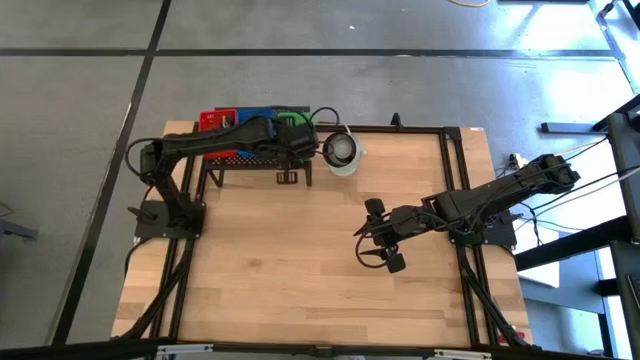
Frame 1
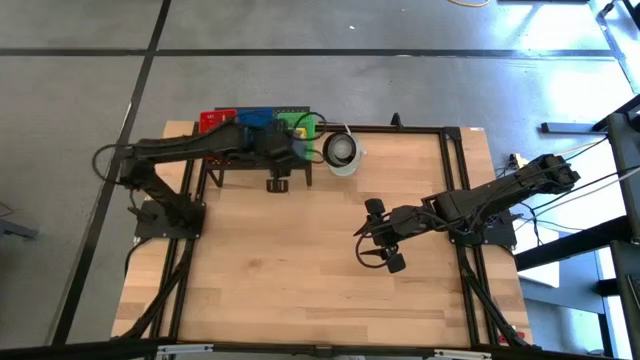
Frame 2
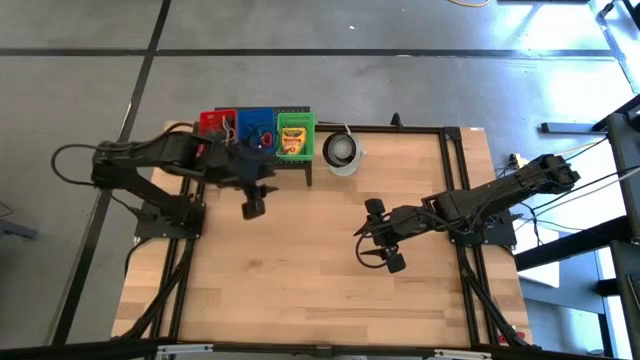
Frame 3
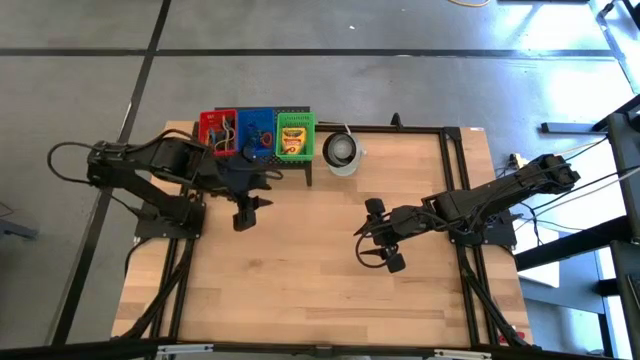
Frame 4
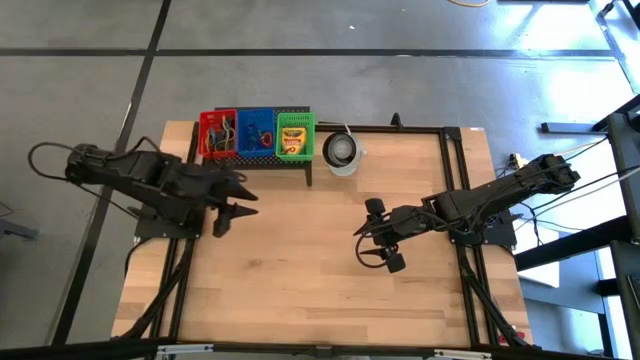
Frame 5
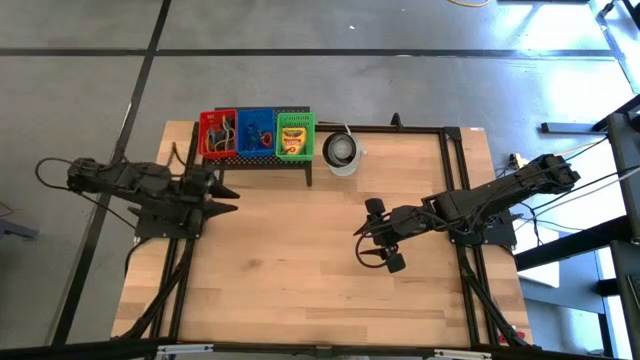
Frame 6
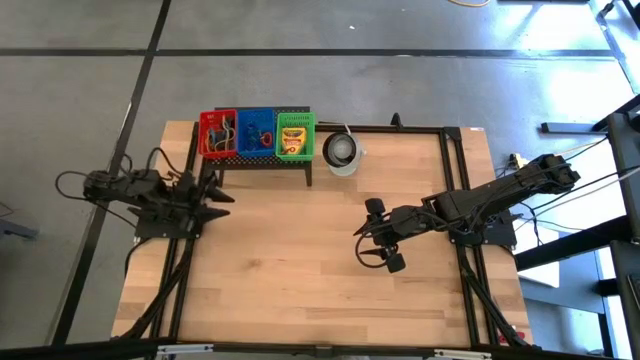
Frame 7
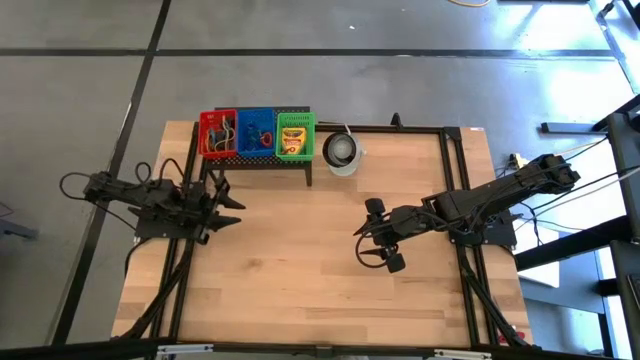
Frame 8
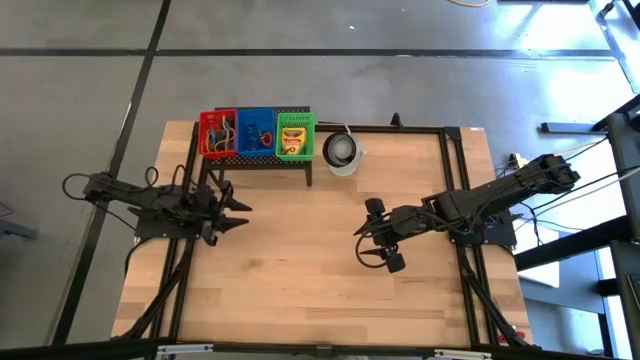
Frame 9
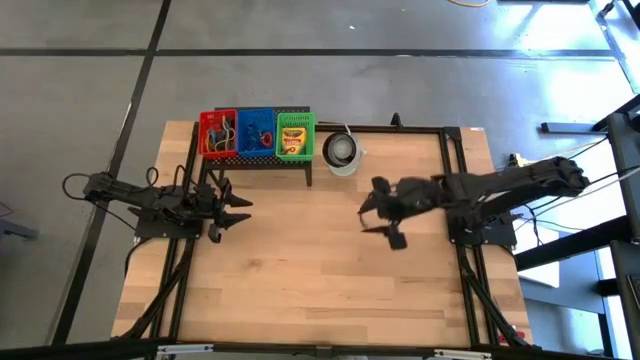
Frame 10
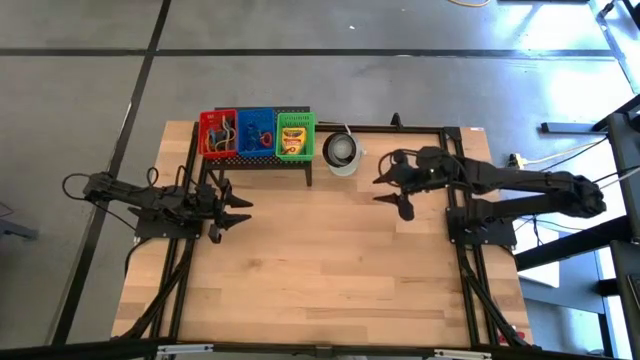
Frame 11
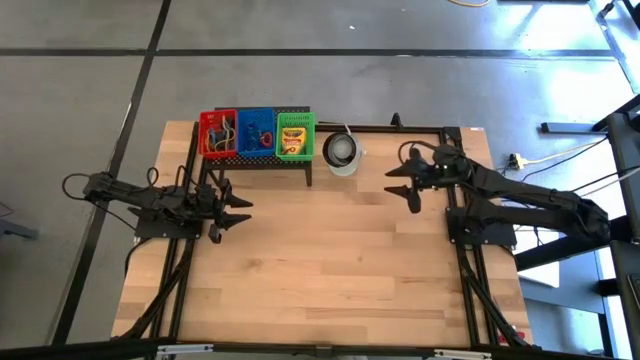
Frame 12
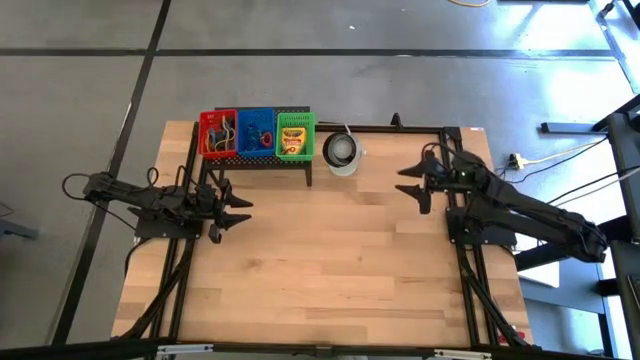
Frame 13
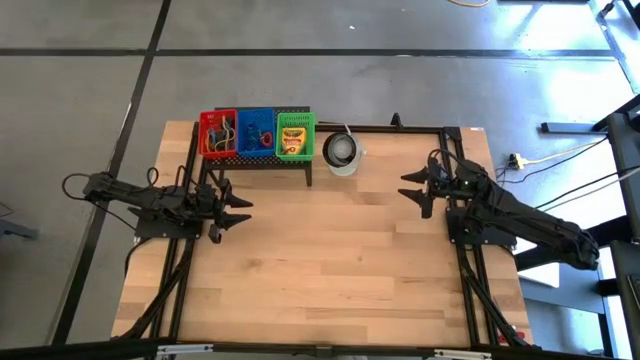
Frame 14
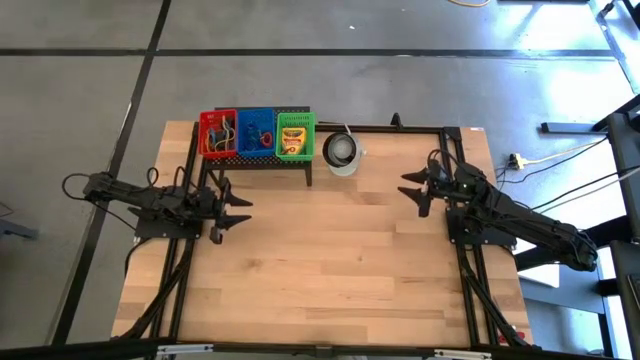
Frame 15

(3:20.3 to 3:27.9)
Task: Pick & Place Office Desk Supplies
Return to Home Position

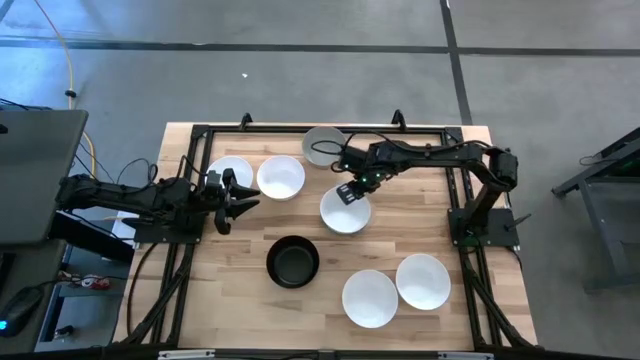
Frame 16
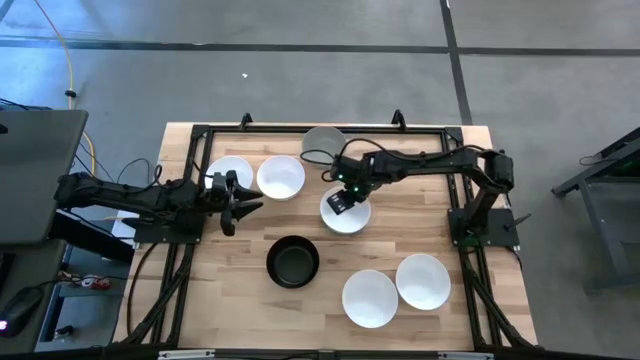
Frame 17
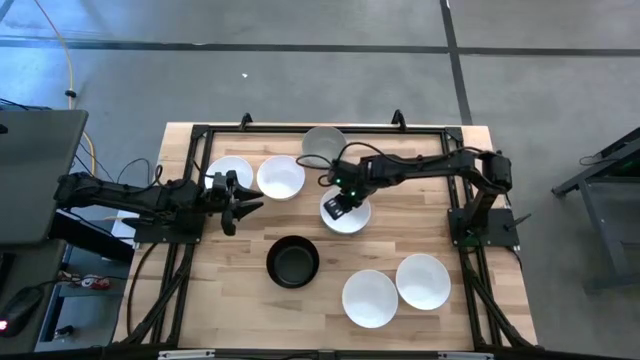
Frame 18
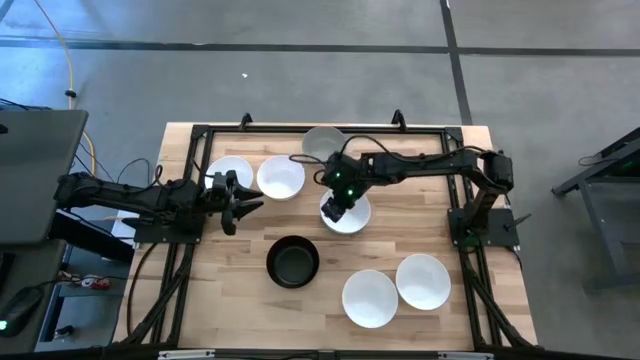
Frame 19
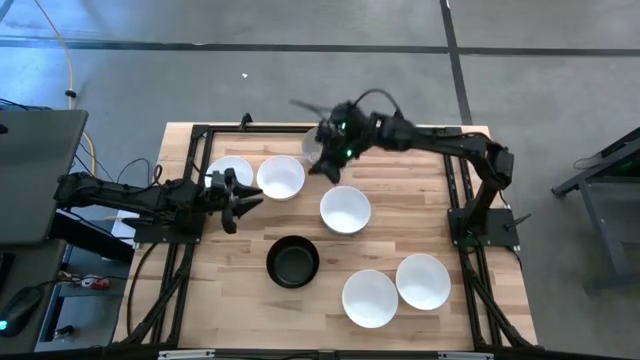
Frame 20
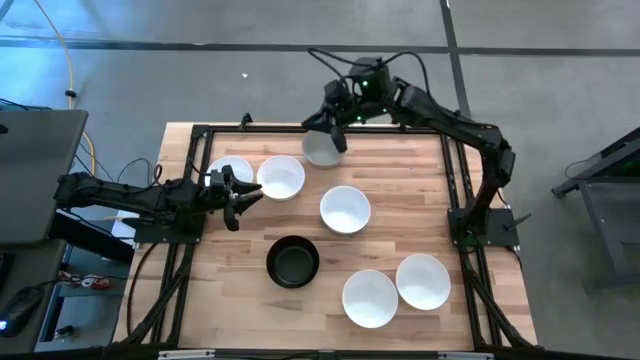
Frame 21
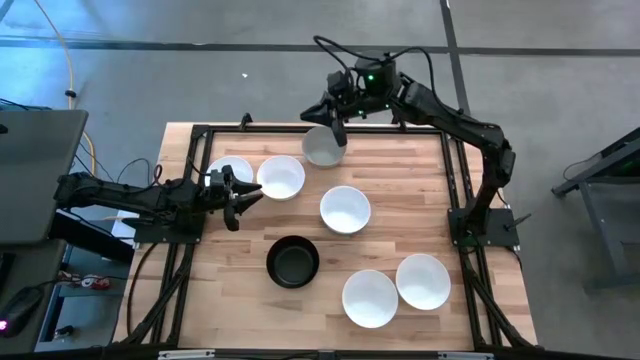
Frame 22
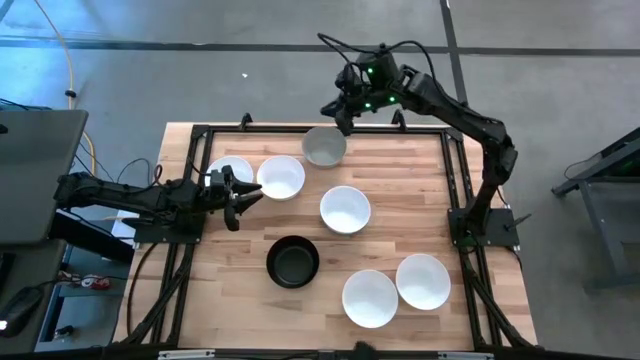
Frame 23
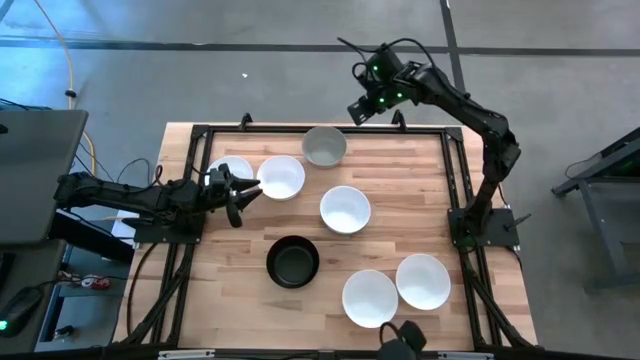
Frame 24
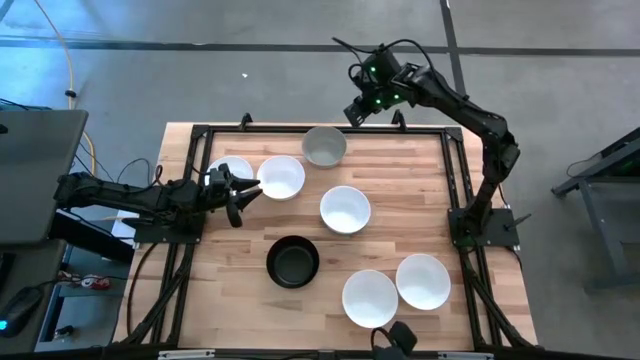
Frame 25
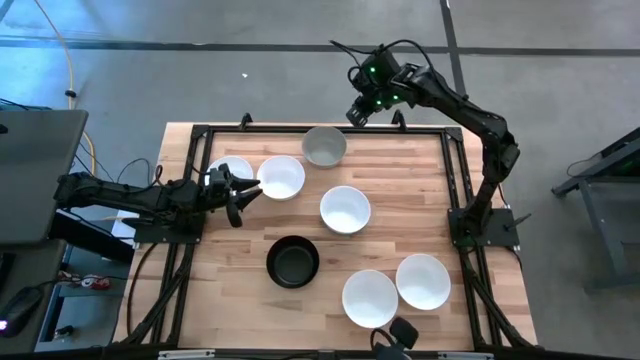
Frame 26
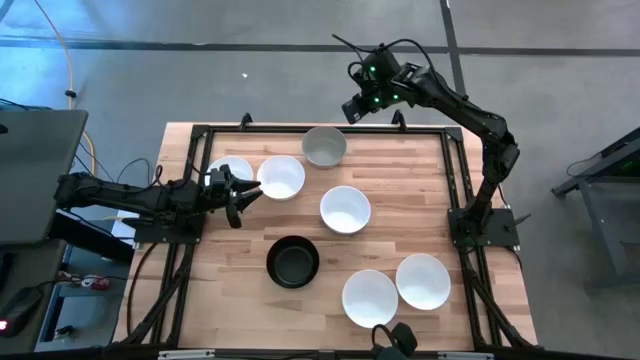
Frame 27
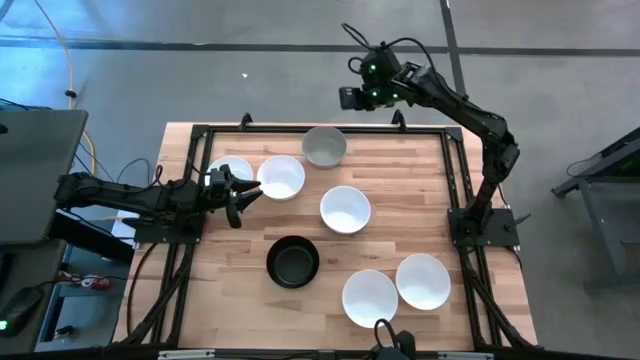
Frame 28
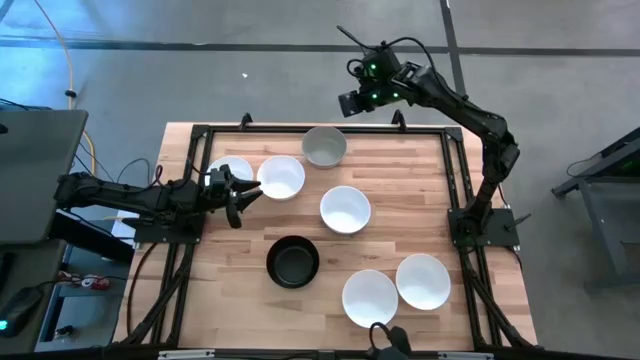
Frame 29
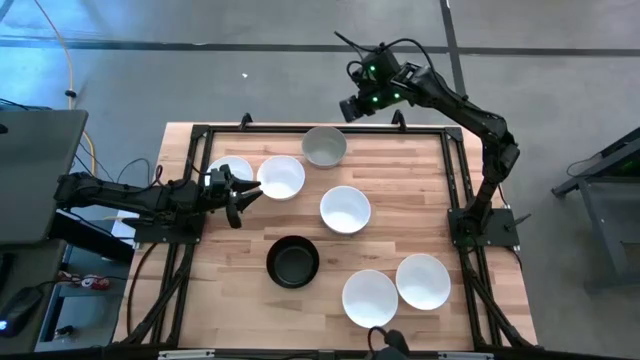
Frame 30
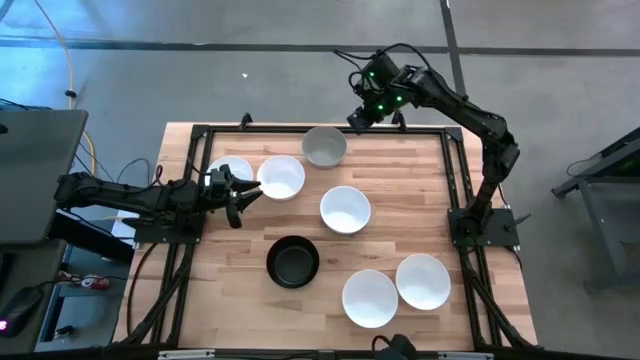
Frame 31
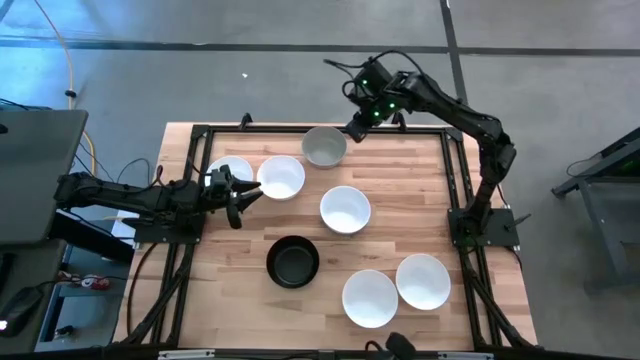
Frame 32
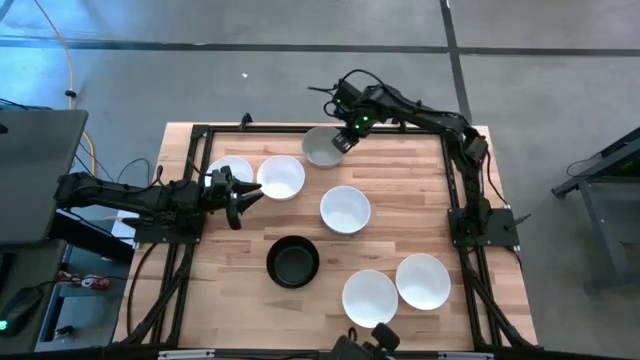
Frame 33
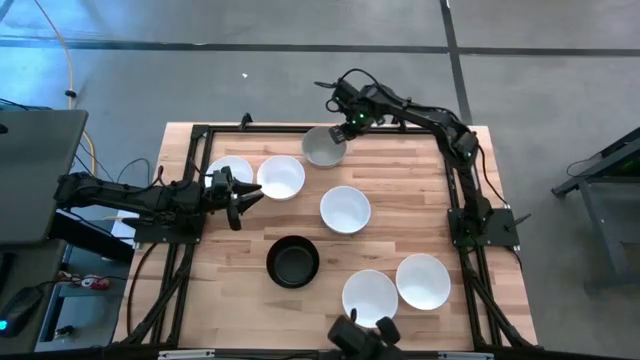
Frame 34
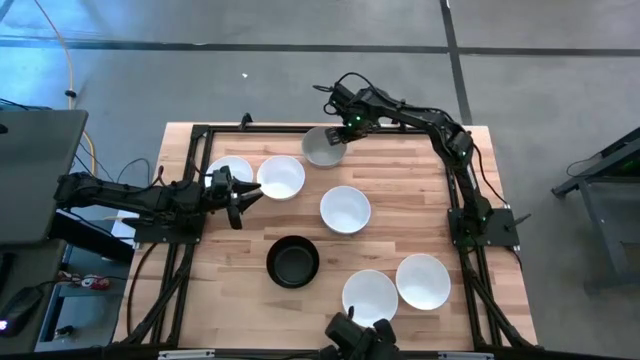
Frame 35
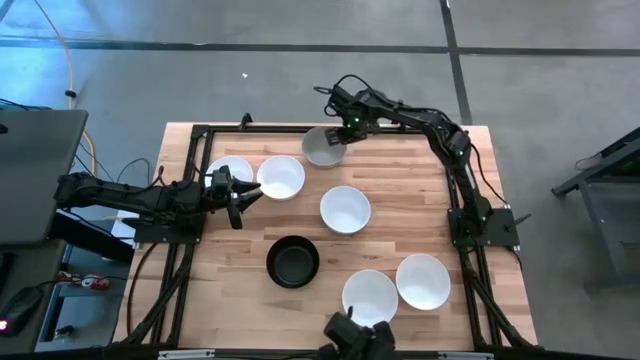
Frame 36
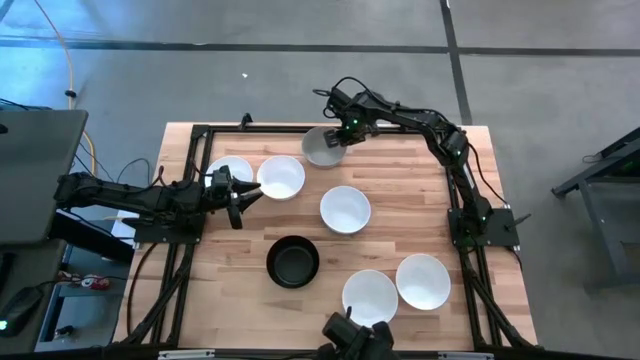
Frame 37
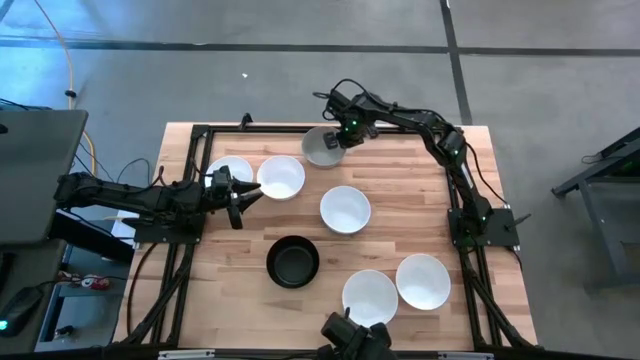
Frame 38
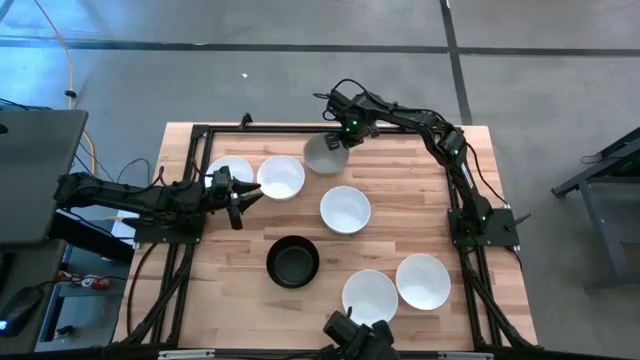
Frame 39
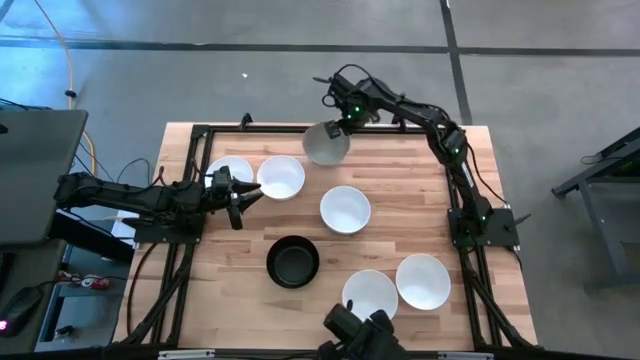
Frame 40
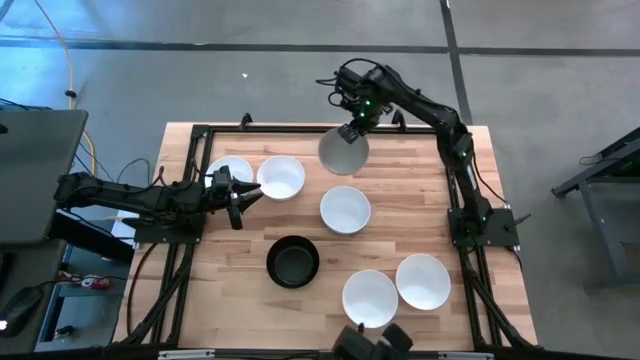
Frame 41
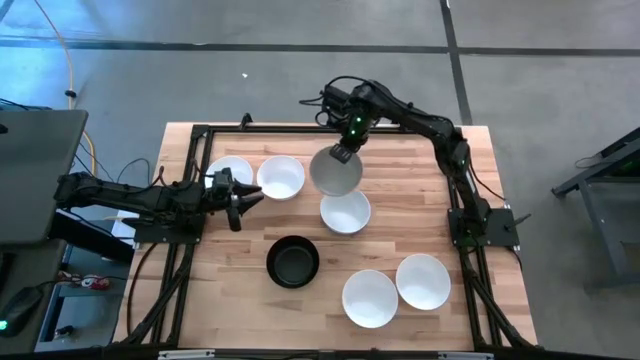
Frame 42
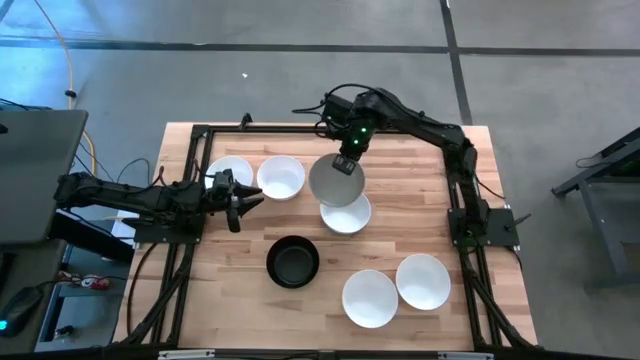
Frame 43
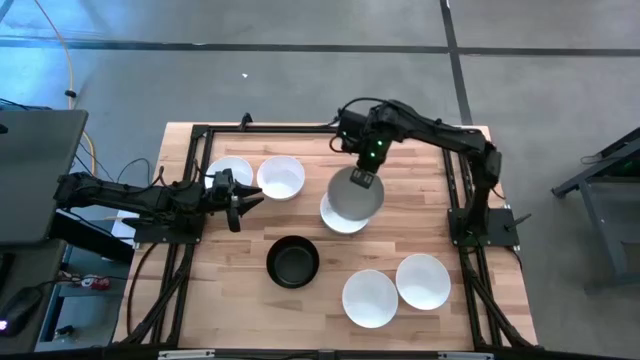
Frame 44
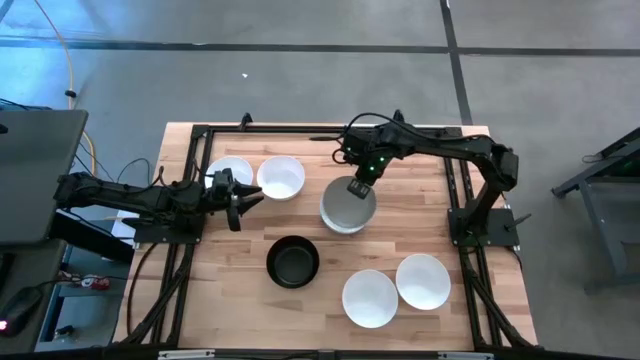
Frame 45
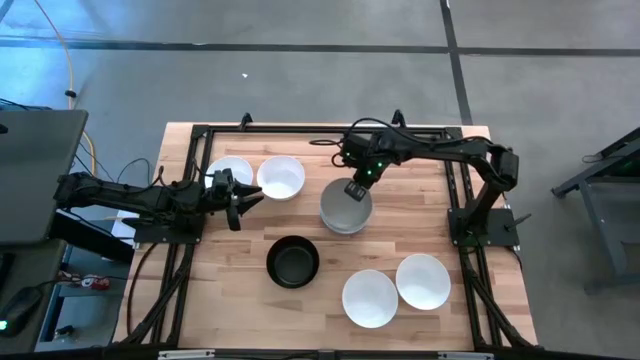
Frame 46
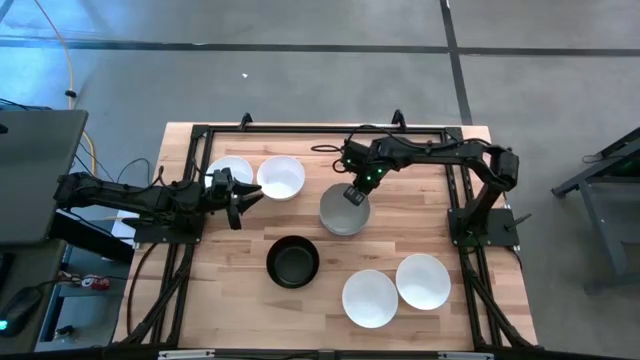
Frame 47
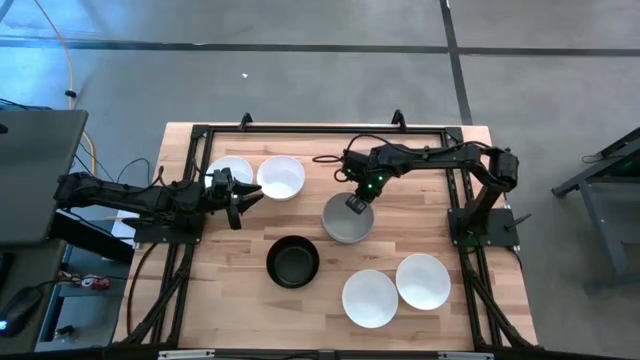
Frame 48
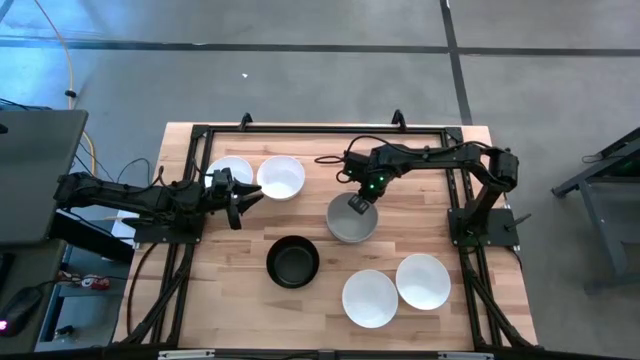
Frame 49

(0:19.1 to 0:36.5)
Task: Nest bowls inside each other
Stack the gray bowl on top of the white bowl
